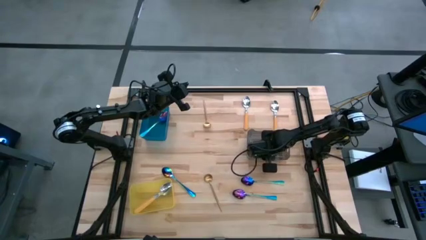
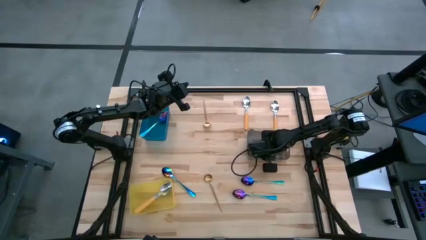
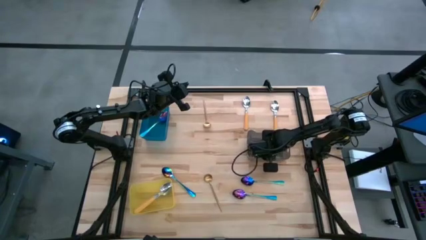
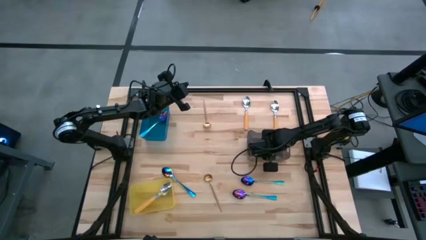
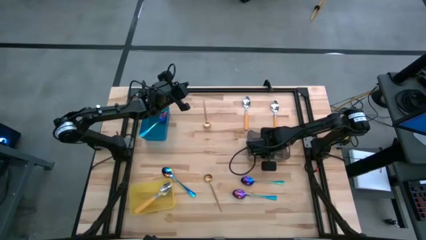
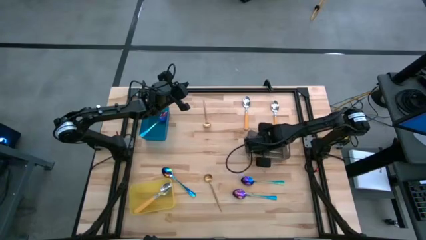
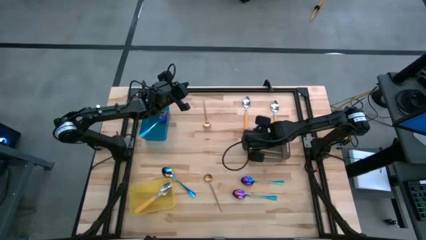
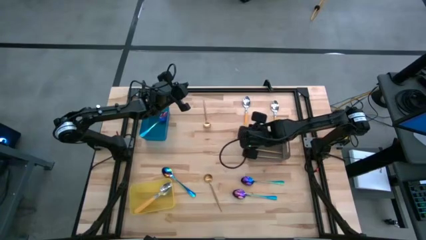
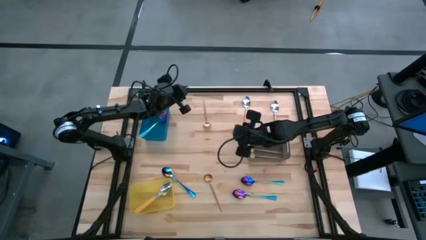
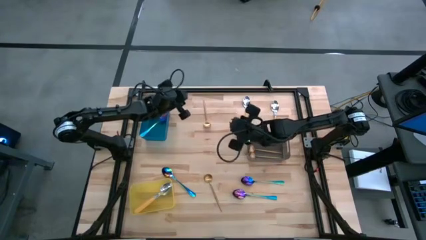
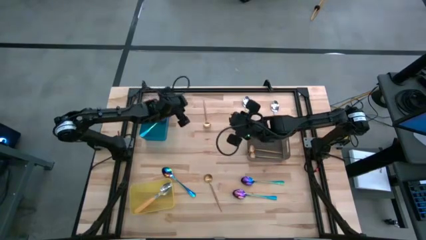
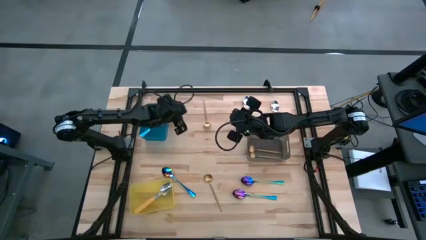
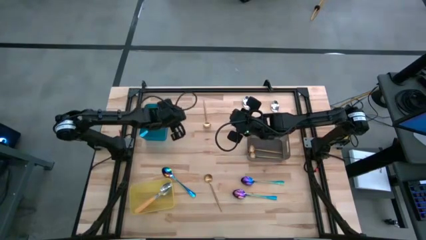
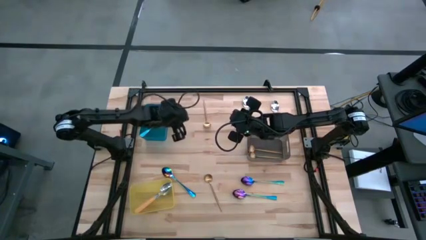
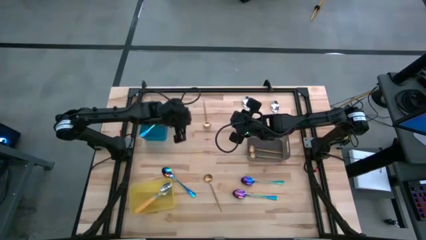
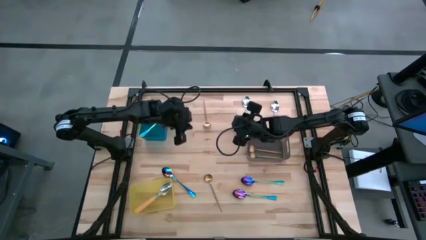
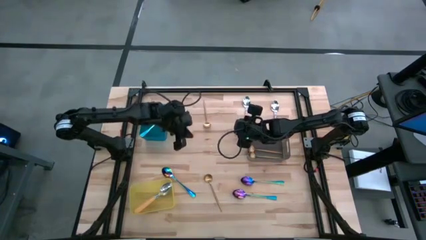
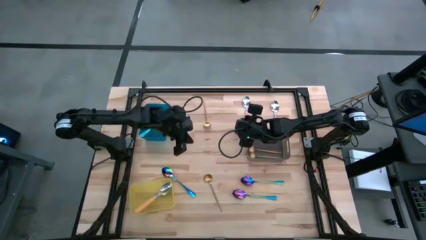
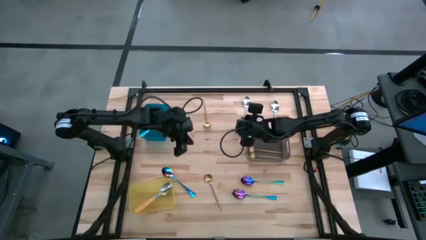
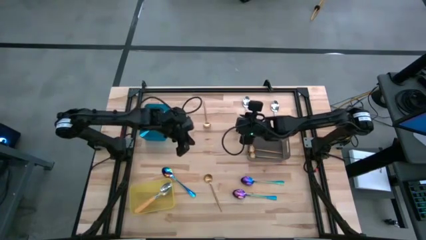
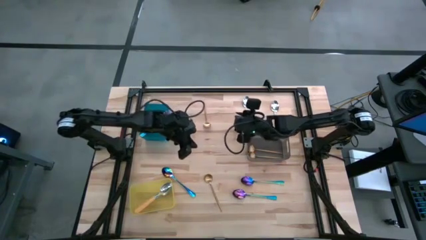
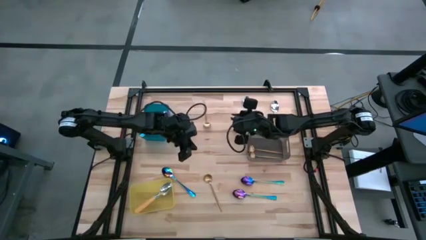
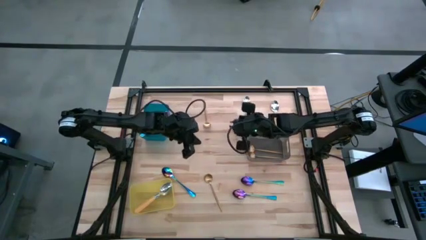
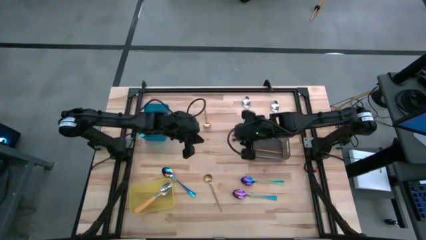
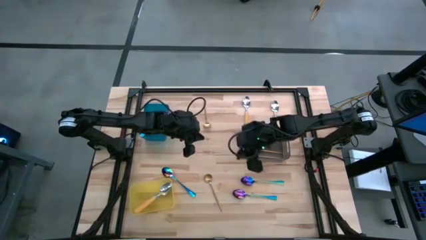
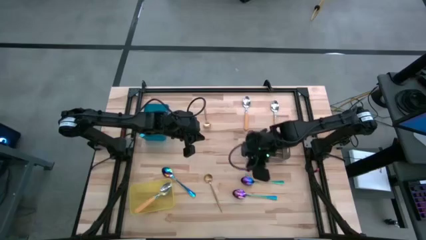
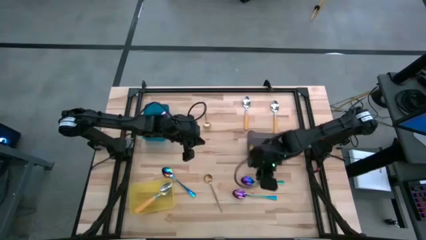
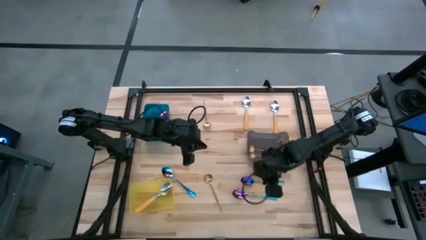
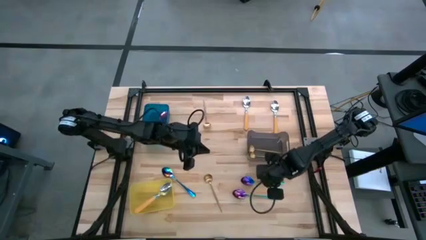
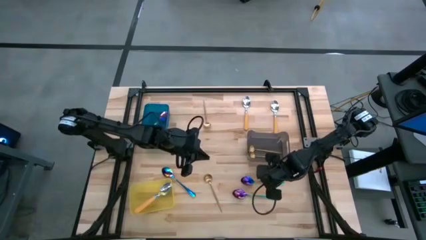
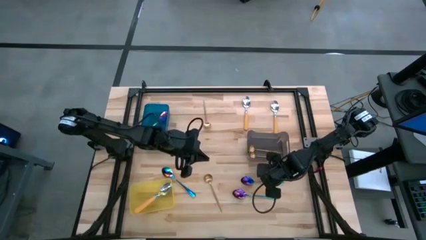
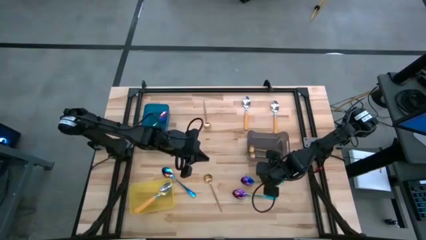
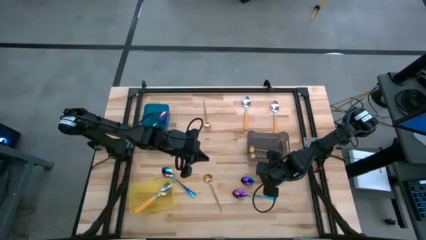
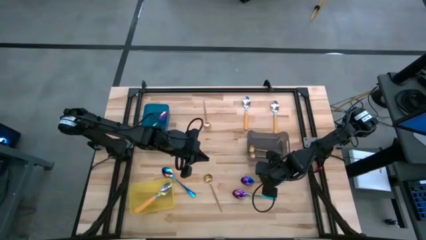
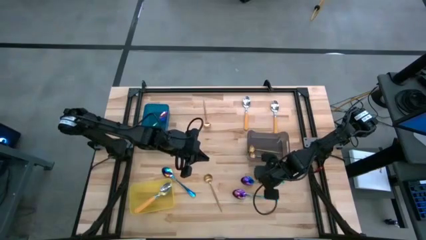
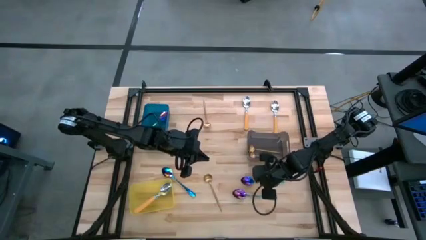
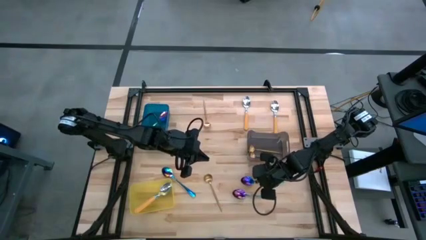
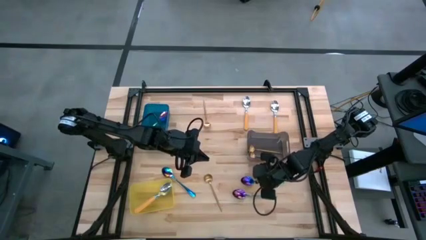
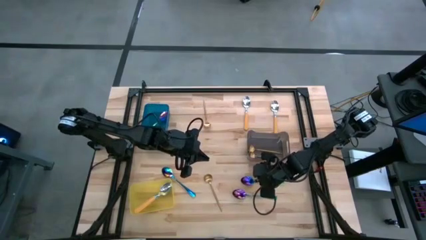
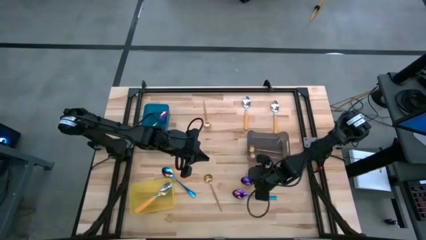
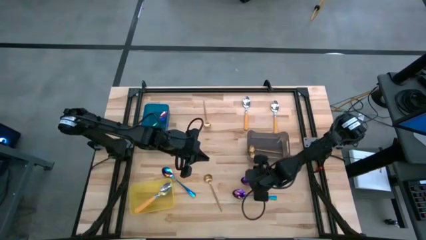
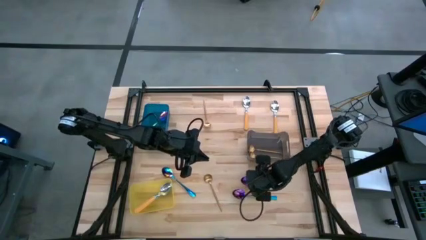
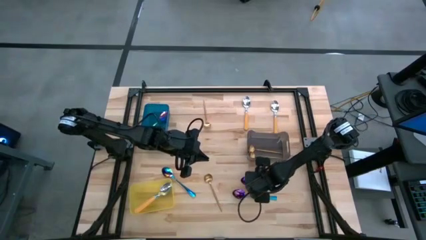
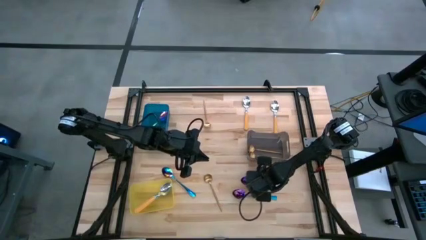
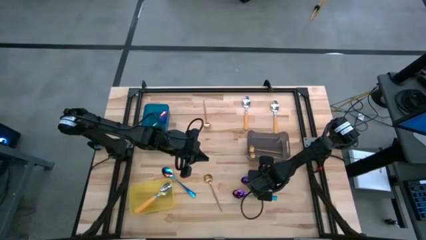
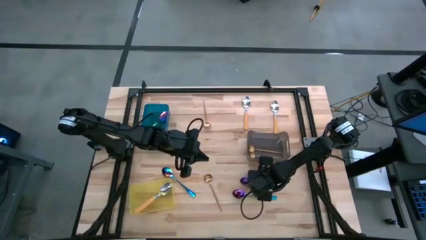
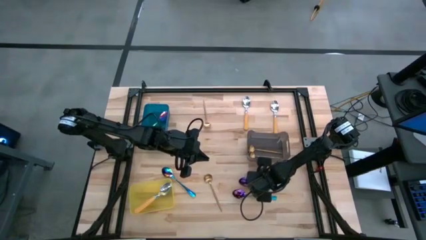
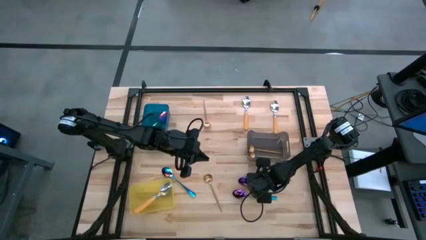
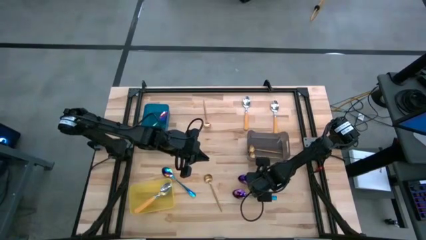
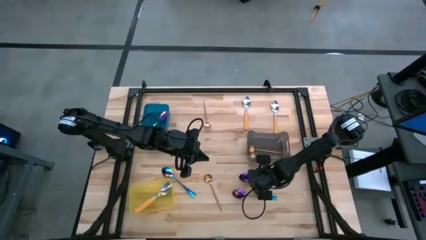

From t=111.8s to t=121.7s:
Task: Sort silverware by color (type)
Put the blue spoon into the blue bin

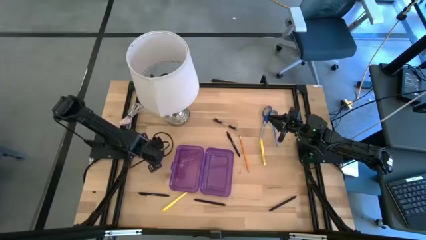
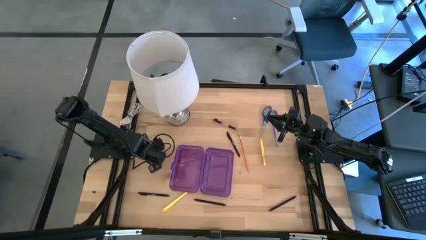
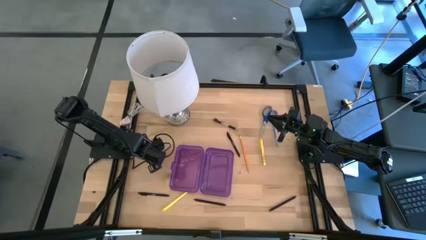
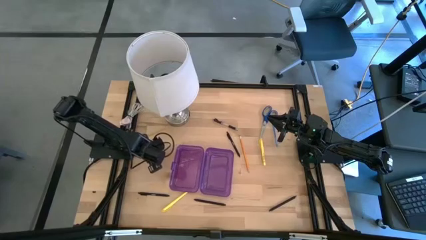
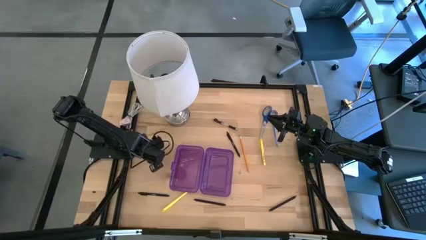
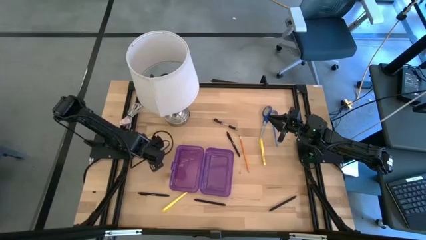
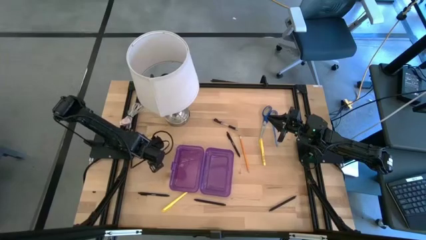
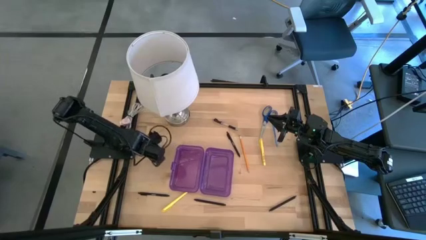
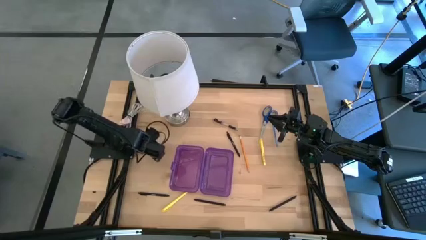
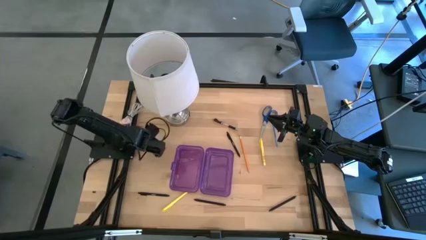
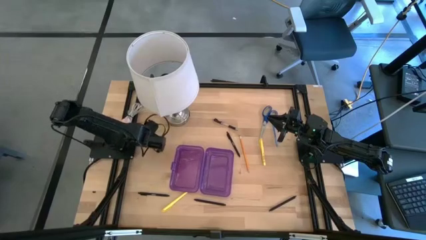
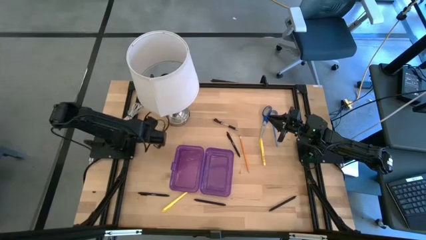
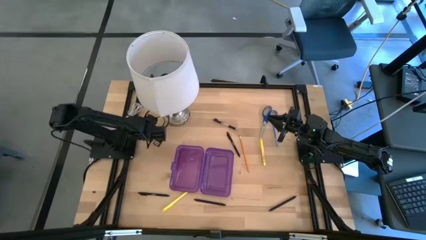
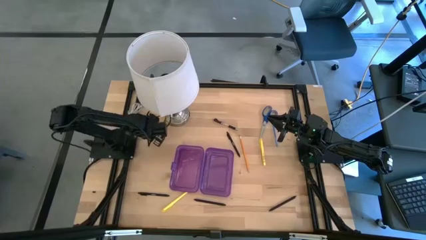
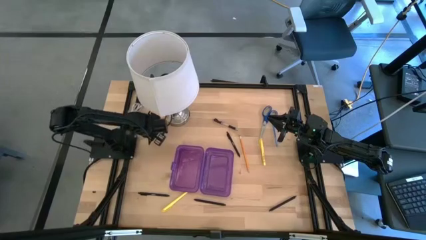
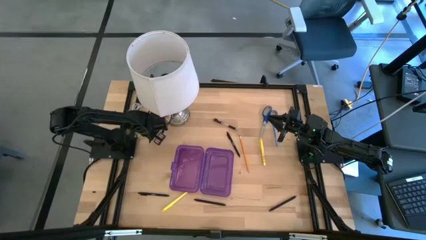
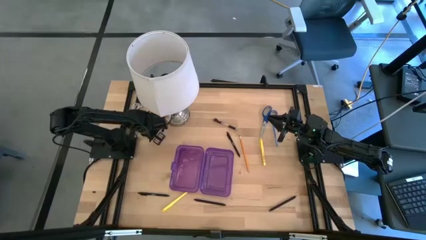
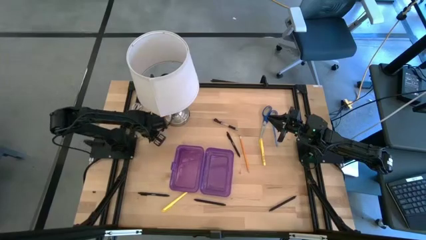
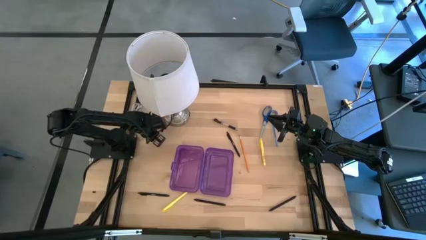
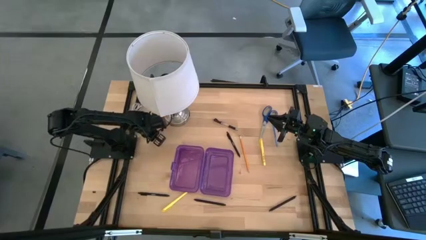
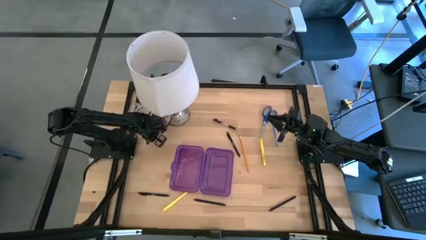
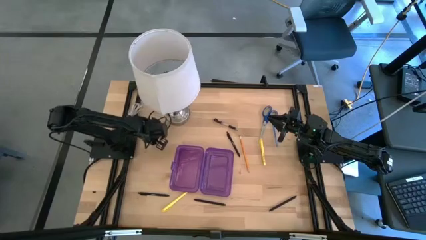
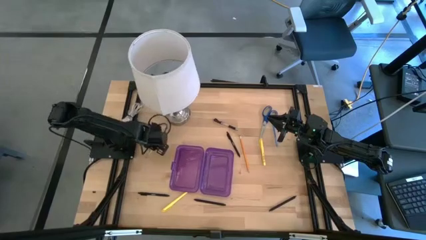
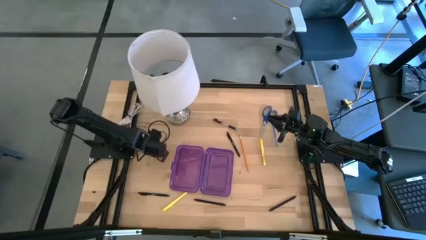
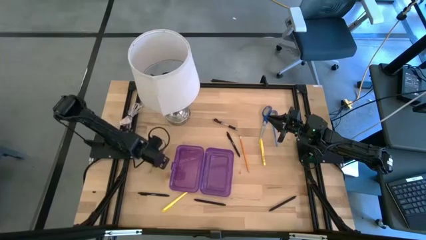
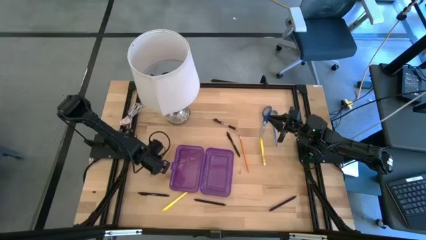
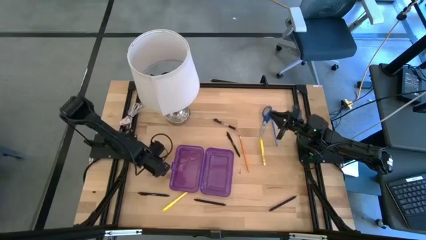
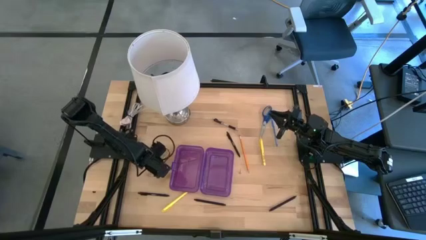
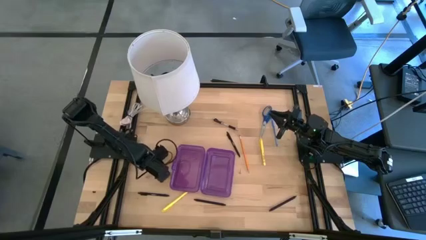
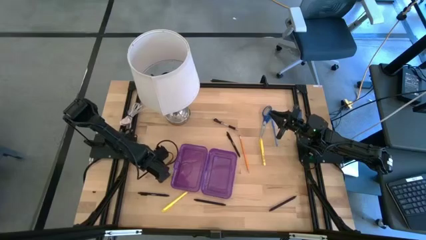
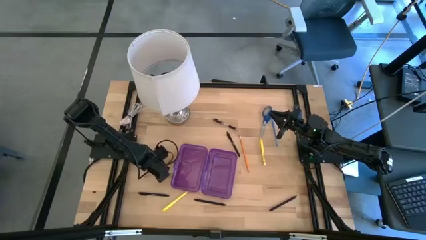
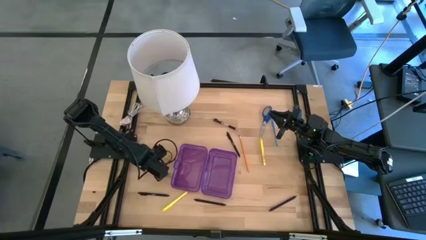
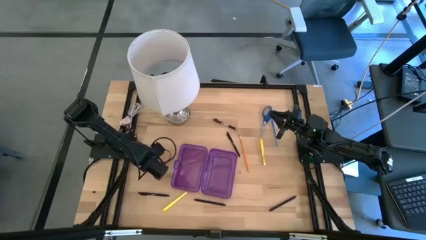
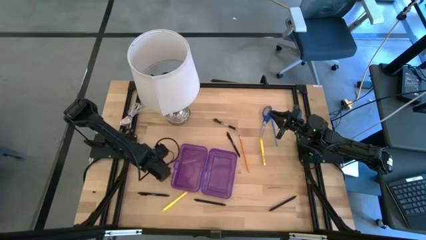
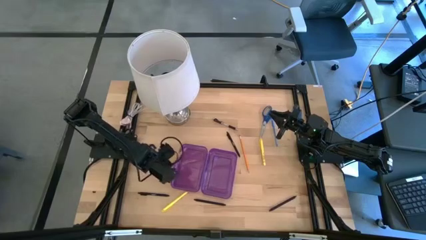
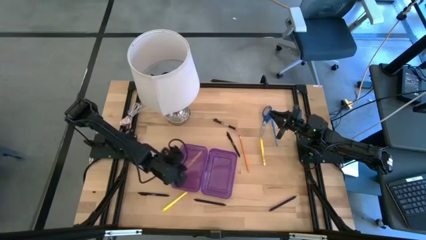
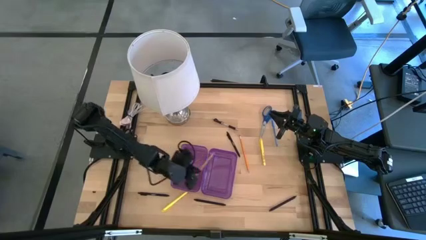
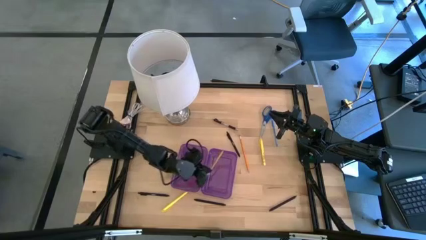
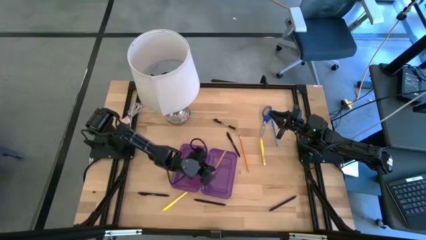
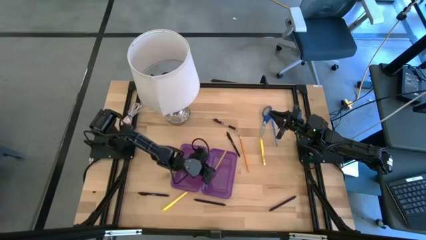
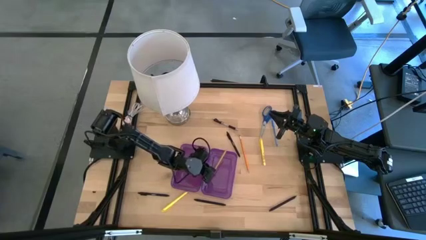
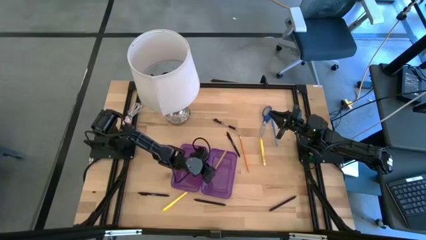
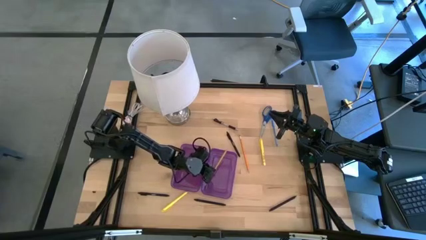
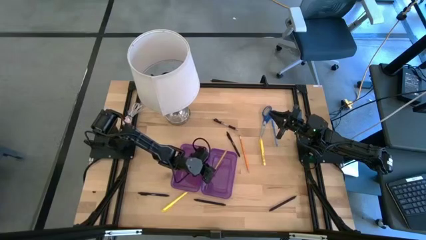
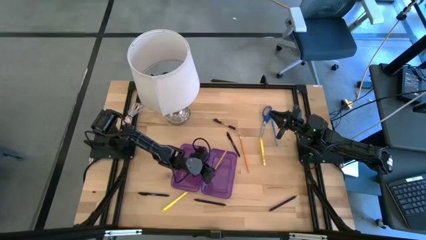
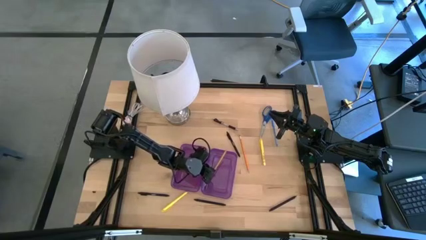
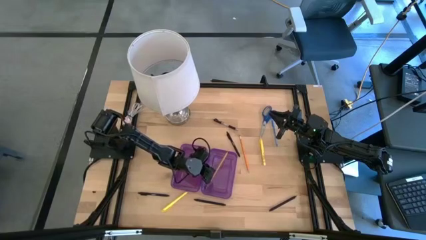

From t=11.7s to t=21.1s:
Task: Pick & place school supplies into a supply box
Put the yellow pencil into the purple supply box
